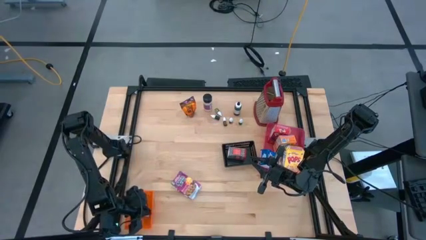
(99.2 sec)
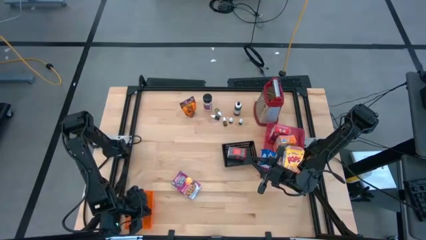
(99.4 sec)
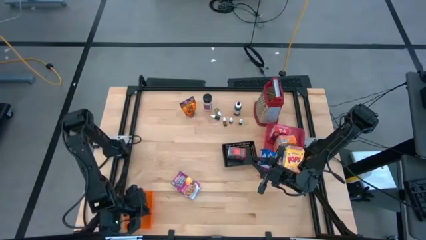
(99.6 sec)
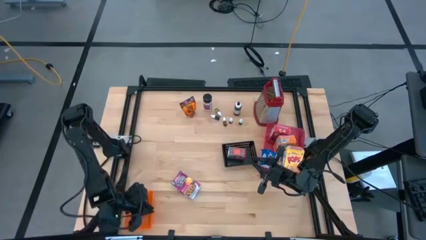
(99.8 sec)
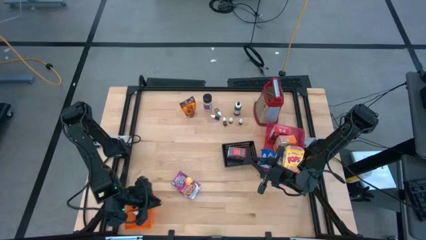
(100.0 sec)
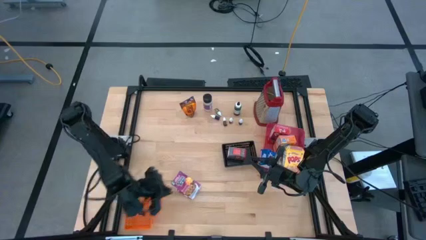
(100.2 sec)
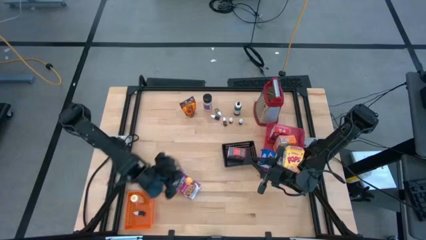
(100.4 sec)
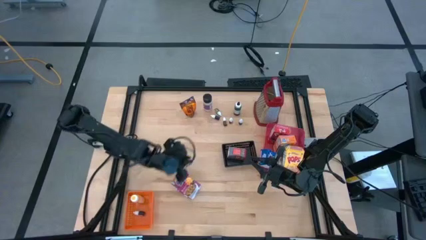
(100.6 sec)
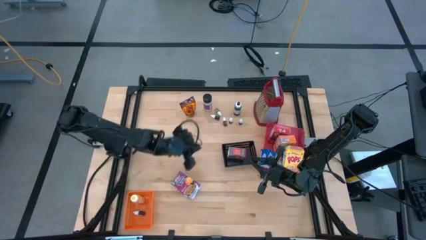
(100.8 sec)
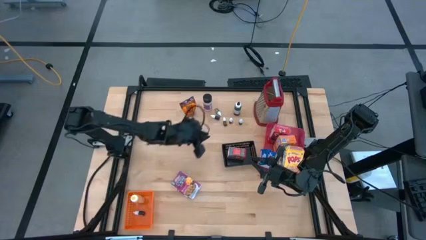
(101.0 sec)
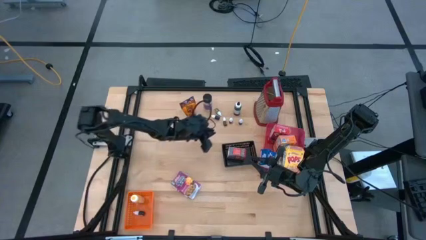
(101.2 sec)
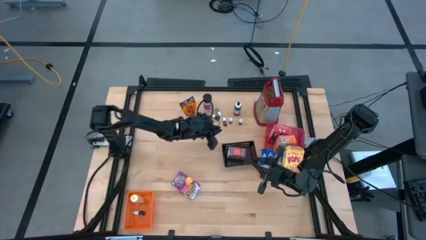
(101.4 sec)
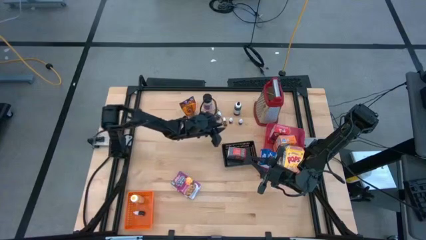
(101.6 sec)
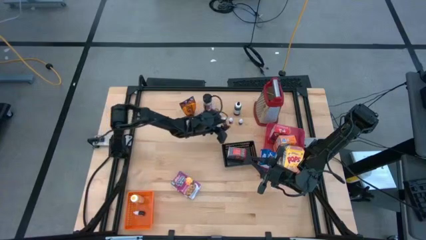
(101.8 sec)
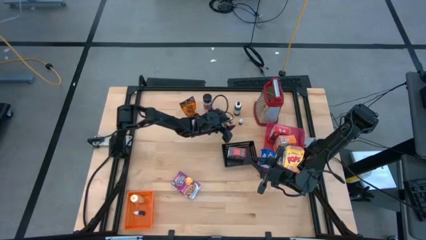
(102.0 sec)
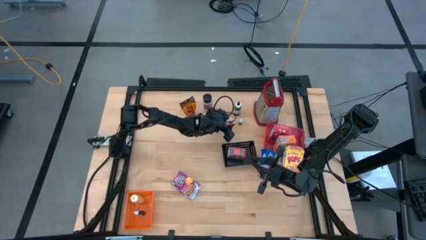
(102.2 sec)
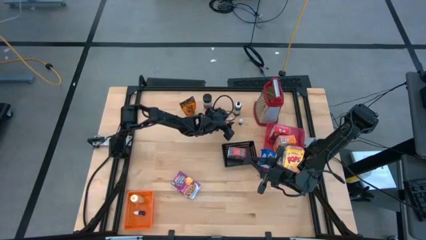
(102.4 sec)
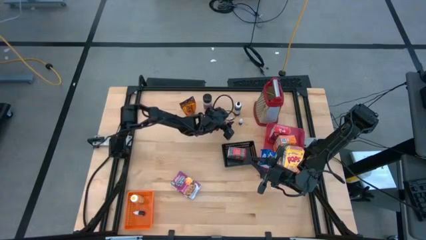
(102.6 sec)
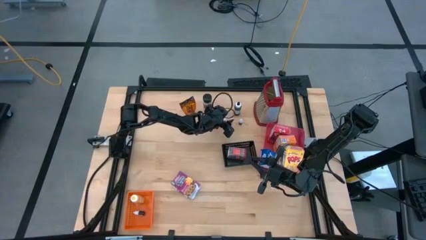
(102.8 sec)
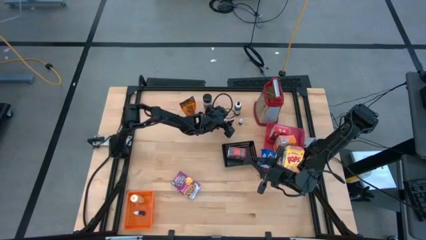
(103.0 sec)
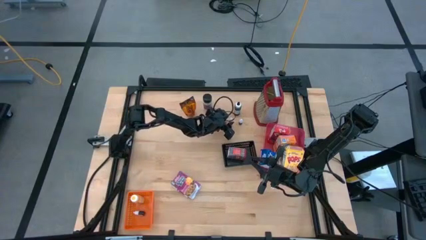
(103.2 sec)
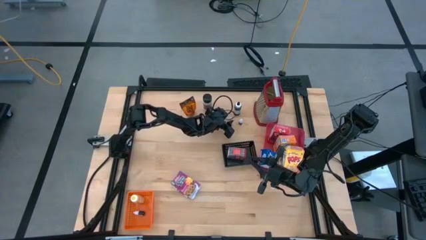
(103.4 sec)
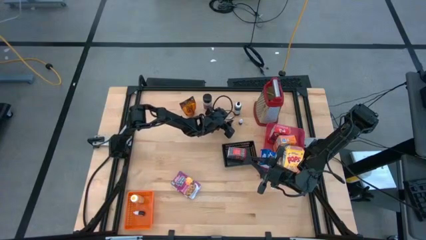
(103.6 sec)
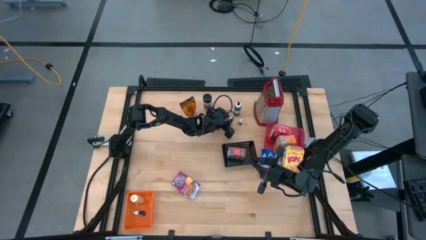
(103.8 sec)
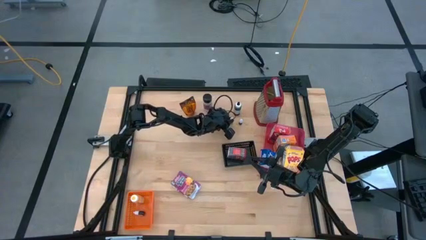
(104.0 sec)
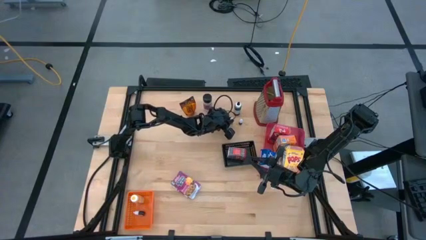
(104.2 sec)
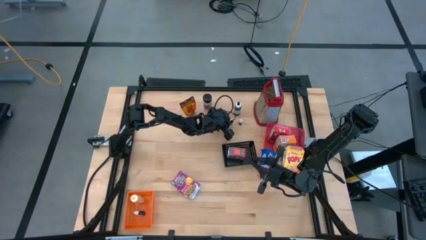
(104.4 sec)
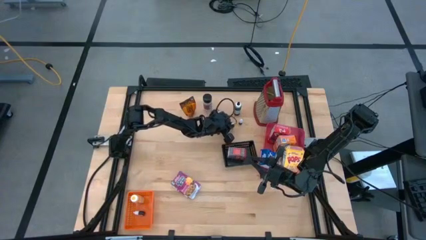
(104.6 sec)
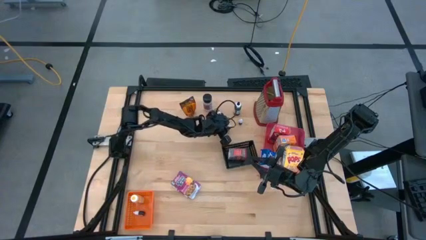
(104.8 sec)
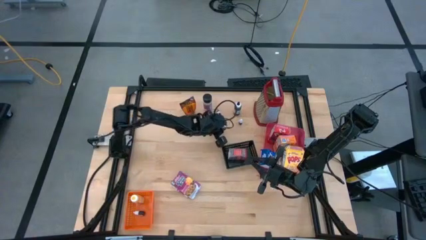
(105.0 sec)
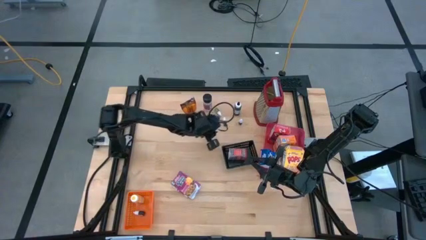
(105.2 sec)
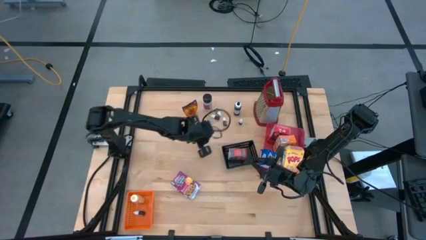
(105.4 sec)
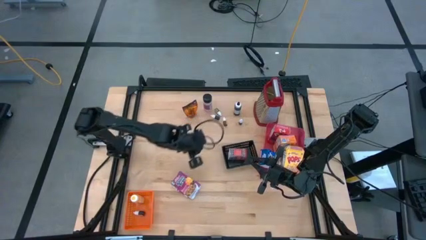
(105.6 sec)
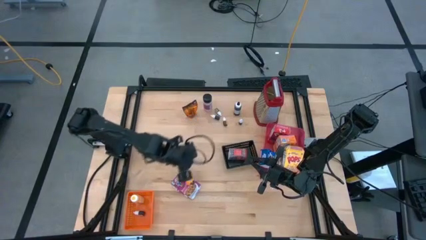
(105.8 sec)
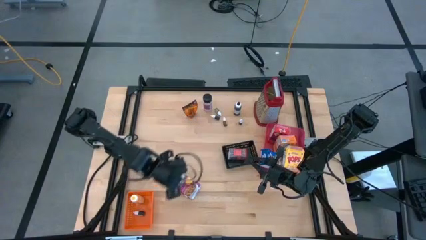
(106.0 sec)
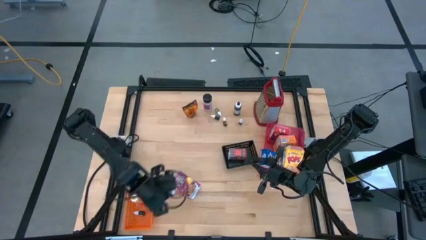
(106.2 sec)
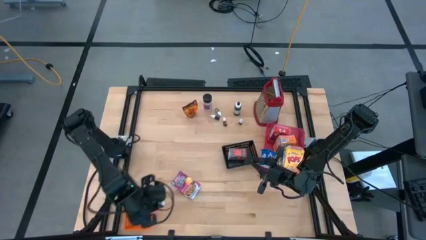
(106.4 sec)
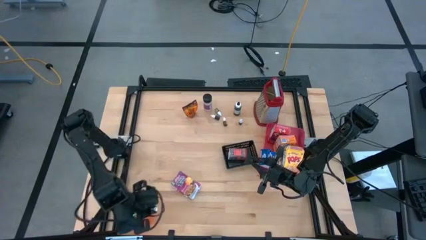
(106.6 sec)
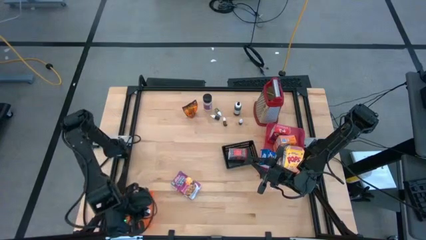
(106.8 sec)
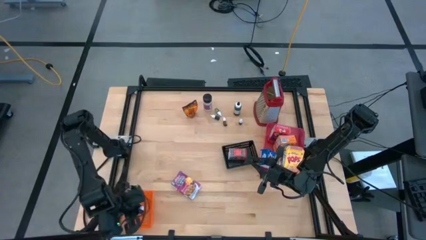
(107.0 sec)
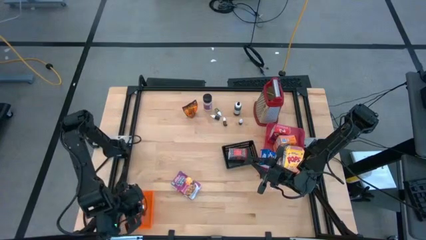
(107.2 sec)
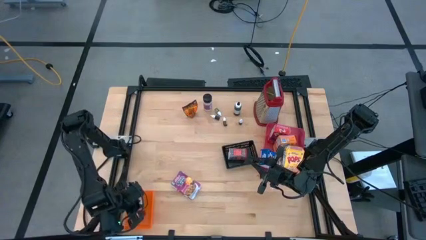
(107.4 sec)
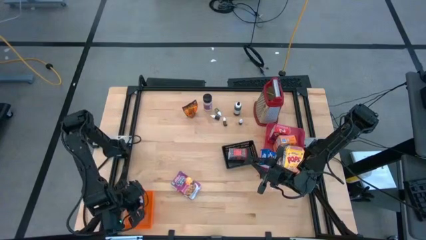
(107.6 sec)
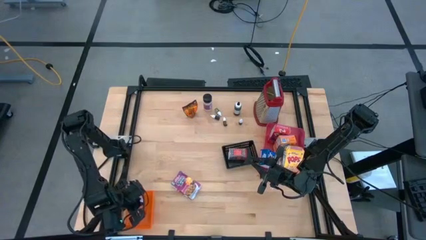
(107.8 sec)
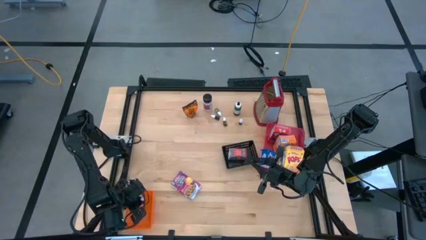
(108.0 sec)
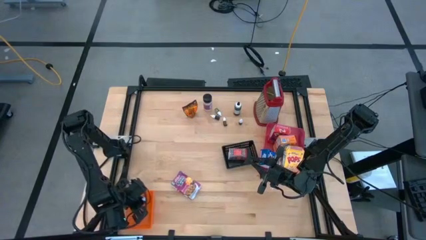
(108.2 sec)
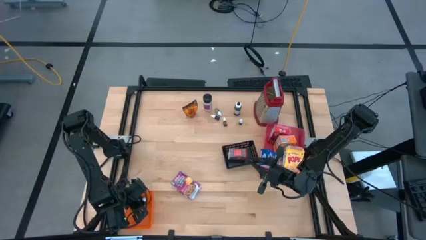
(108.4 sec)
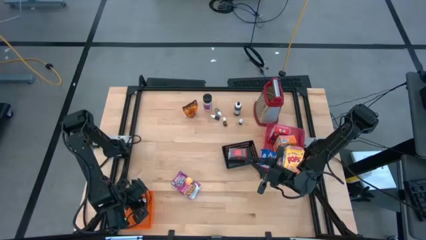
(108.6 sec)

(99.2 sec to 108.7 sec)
Task: Pick & Place Kitchen Items
Put the small orange food coloring bottle into the orange bin

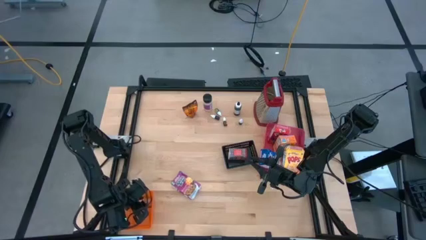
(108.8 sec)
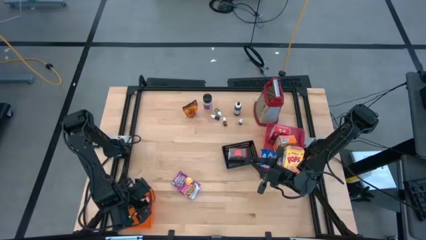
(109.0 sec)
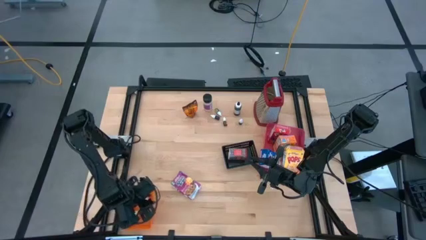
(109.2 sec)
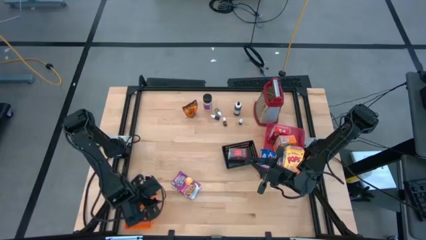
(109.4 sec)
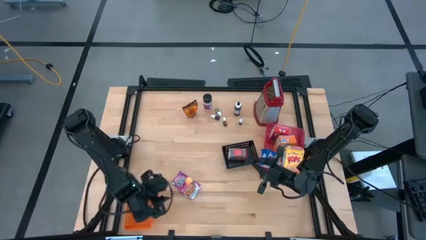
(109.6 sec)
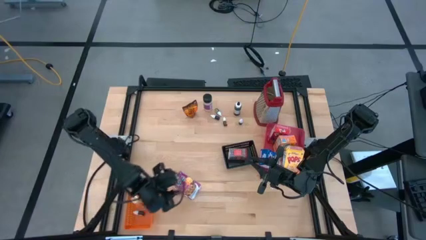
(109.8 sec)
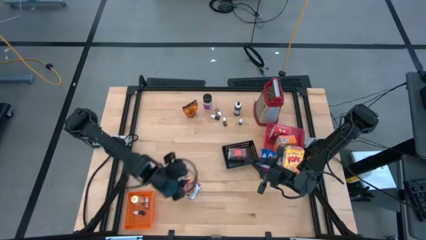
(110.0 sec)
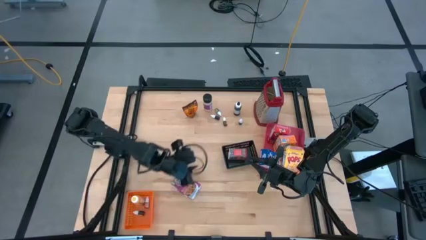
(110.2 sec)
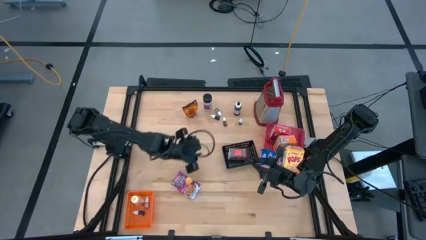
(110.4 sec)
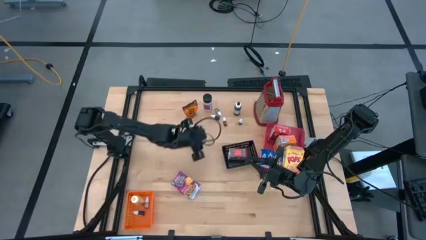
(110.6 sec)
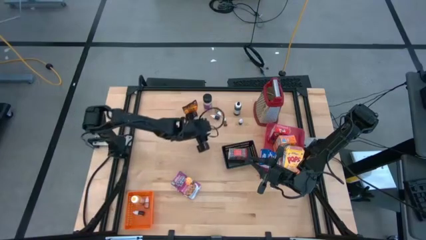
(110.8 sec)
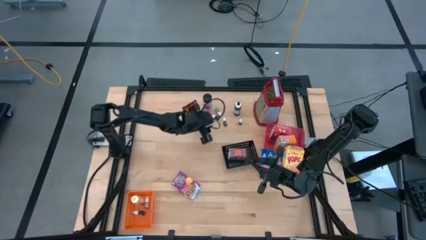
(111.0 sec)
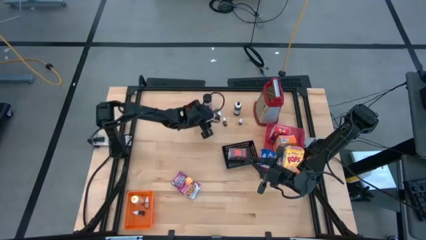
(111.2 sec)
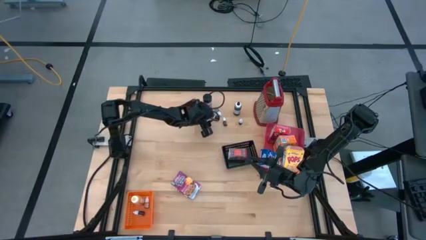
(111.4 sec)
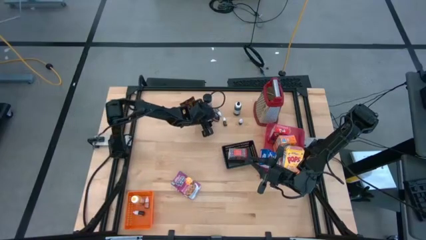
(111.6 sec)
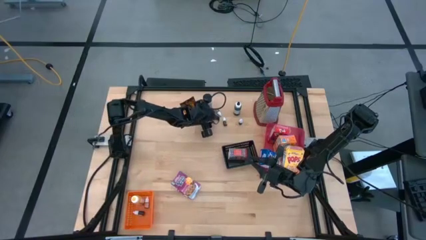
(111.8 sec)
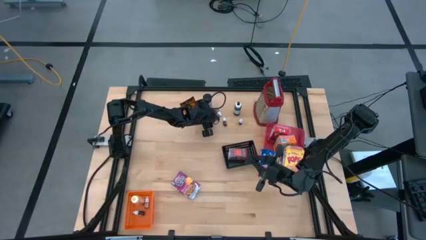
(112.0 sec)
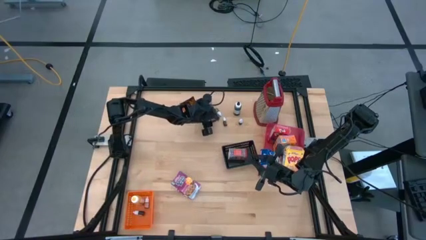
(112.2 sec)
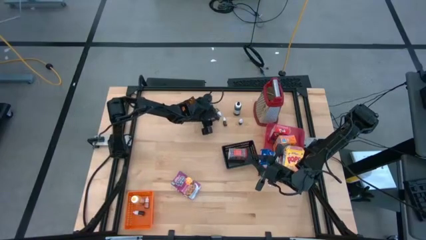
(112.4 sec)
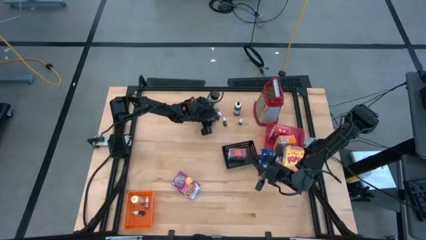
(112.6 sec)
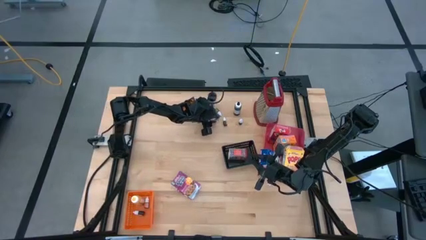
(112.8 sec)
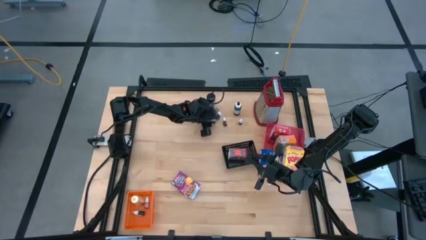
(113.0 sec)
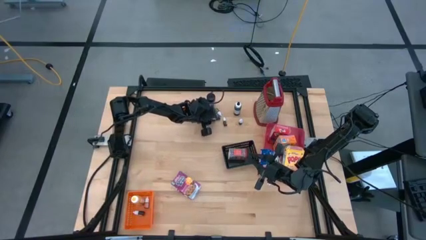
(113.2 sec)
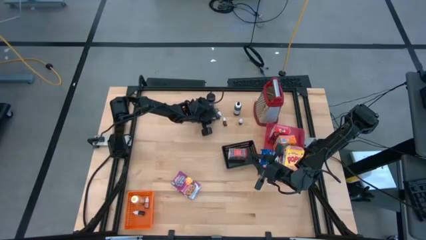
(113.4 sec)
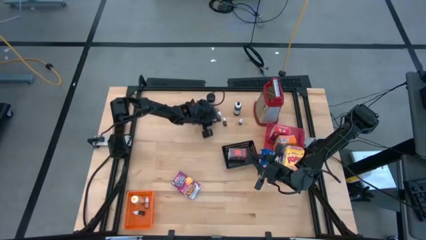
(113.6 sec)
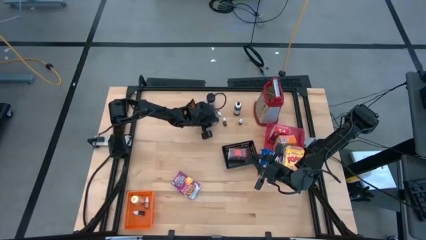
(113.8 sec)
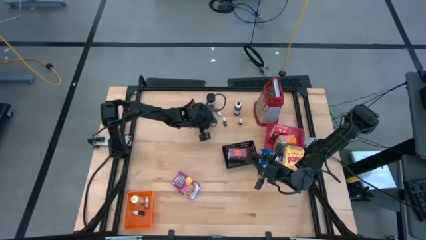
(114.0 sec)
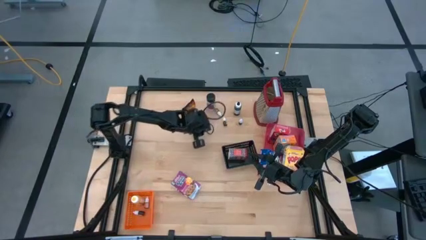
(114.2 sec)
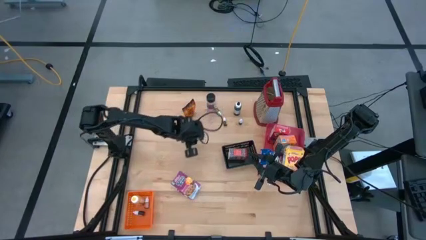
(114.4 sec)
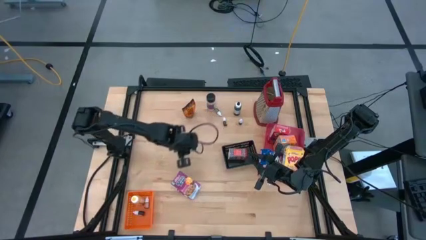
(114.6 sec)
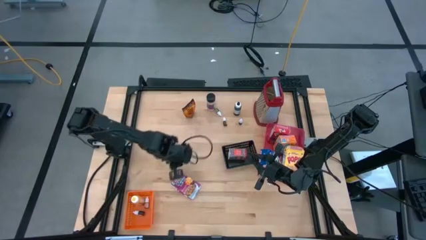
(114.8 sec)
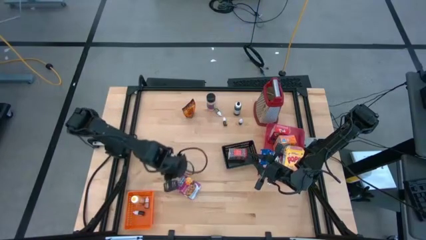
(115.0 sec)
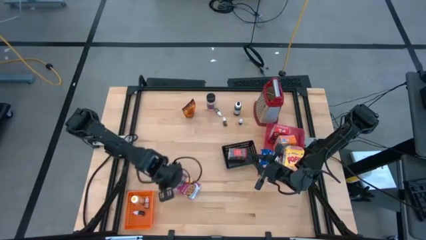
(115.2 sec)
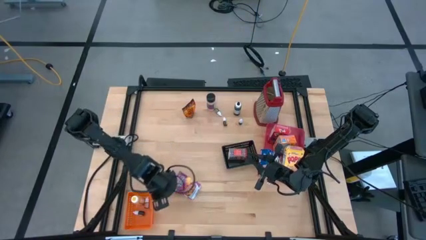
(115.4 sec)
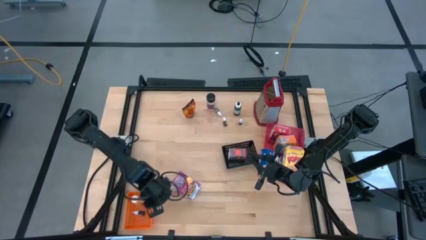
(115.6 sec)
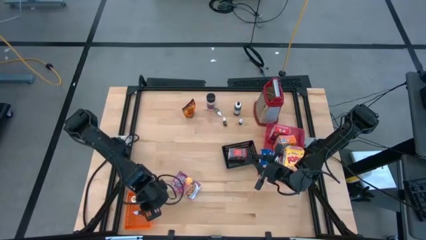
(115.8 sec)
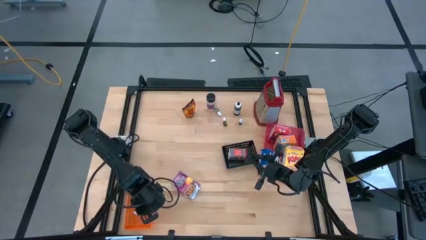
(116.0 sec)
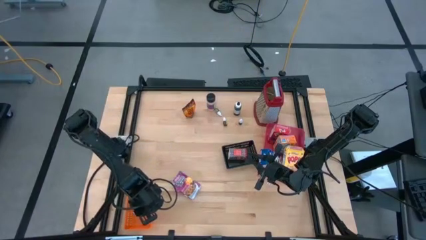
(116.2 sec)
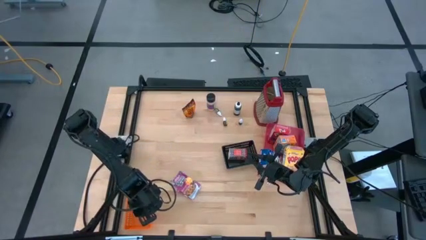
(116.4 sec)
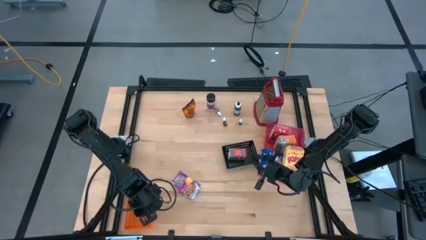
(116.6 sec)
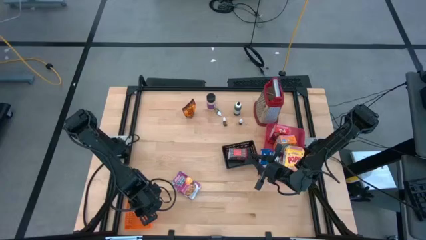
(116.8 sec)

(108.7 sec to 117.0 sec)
Put the small black food coloring bottle into the orange bin
